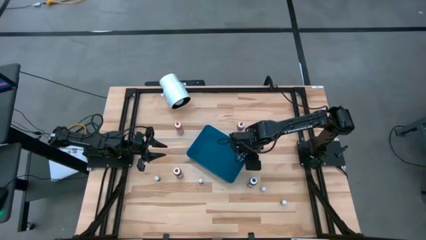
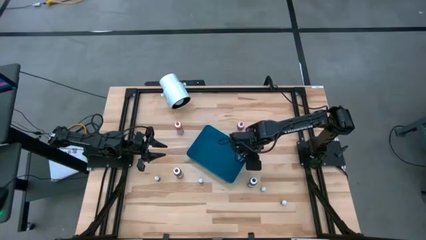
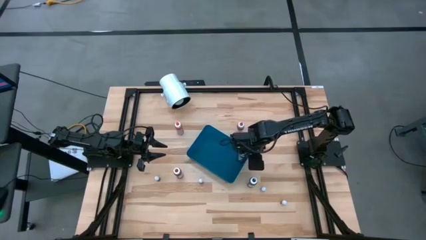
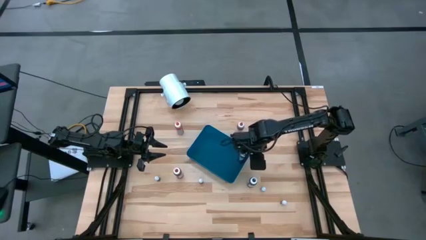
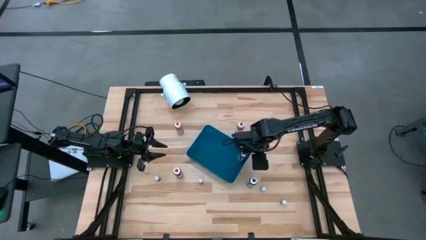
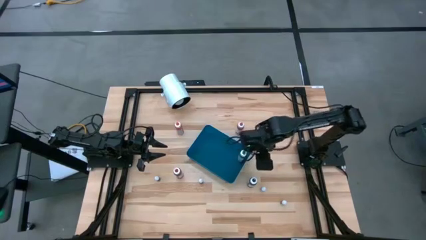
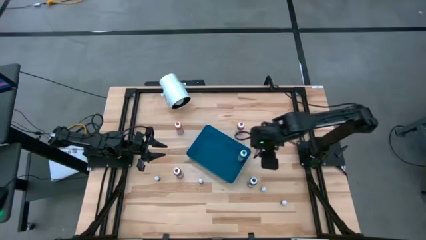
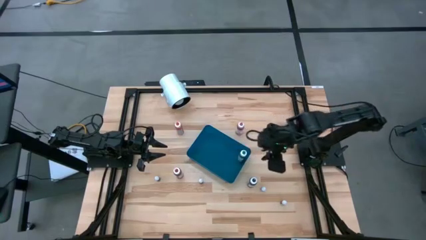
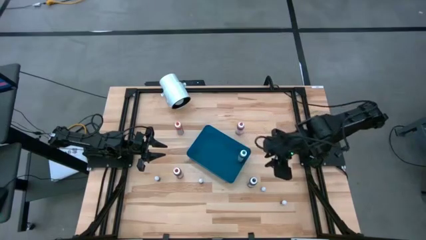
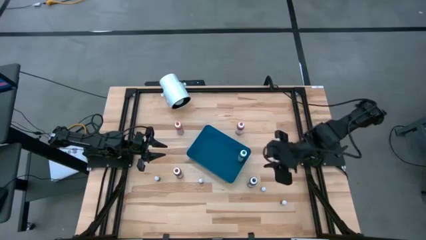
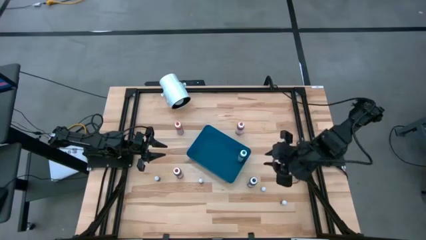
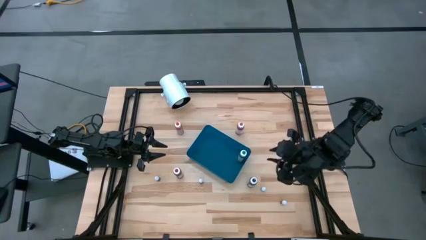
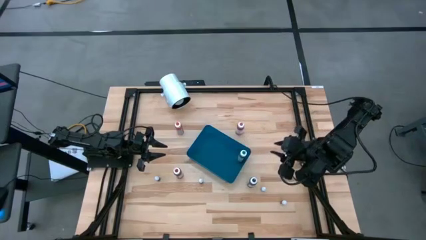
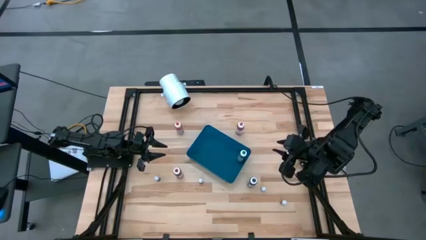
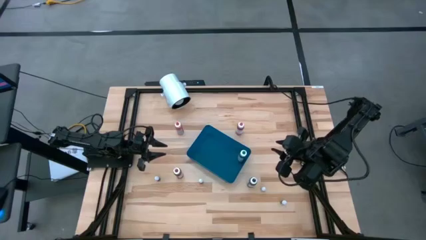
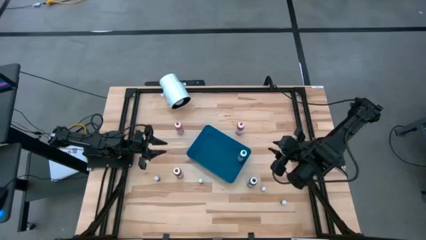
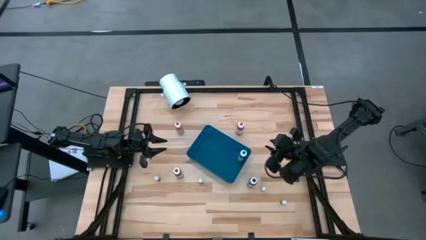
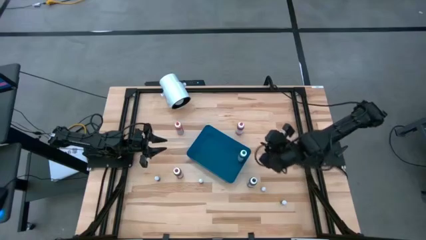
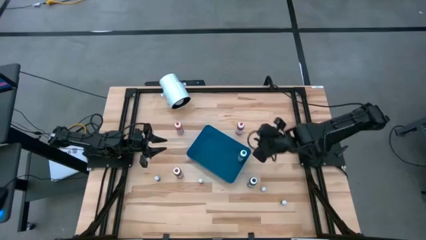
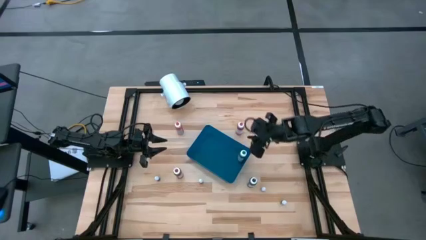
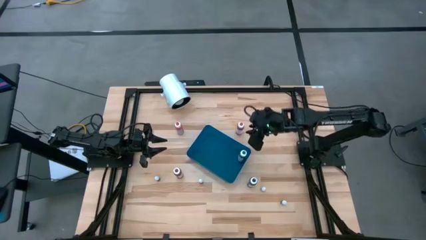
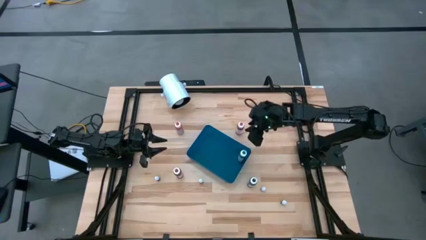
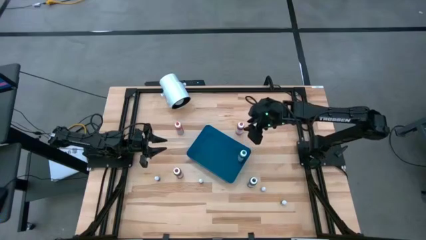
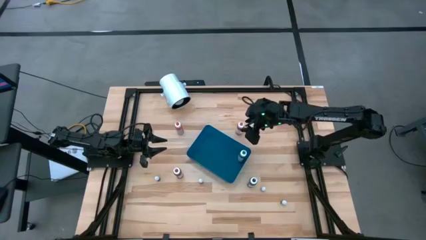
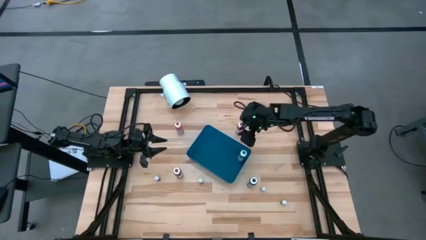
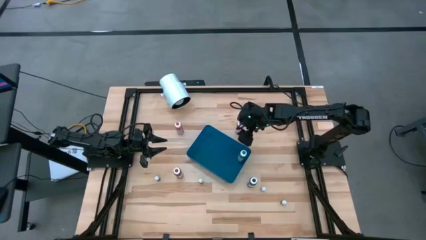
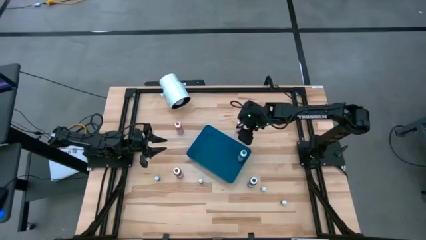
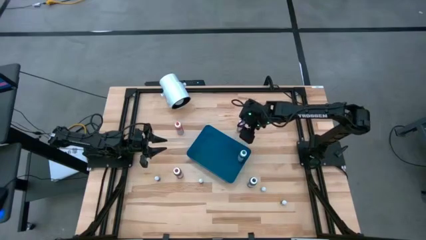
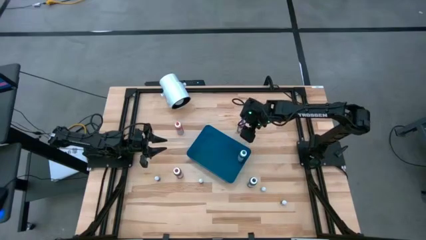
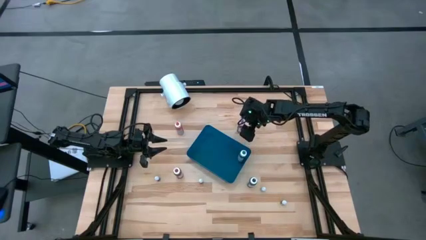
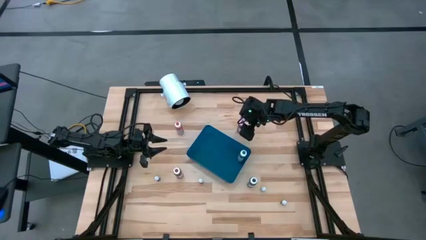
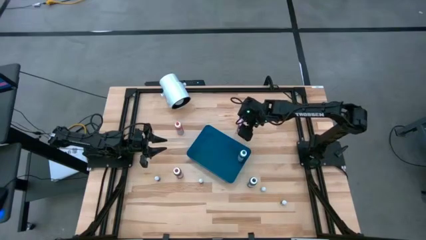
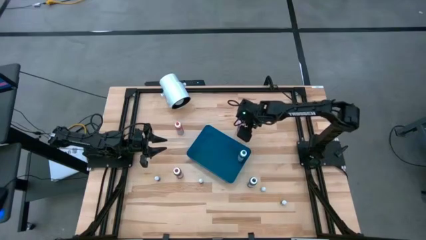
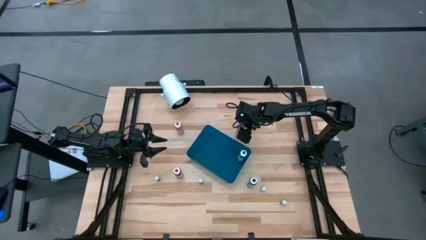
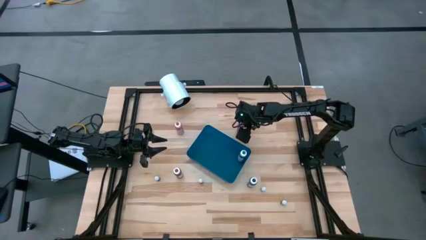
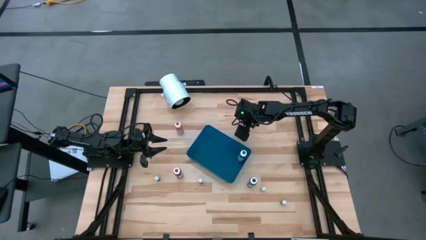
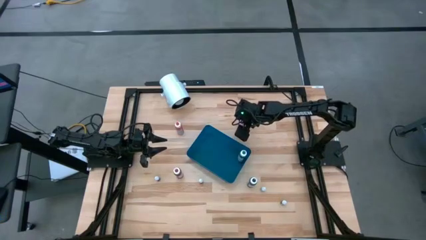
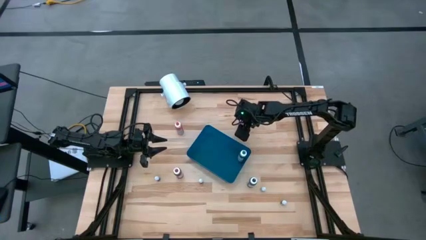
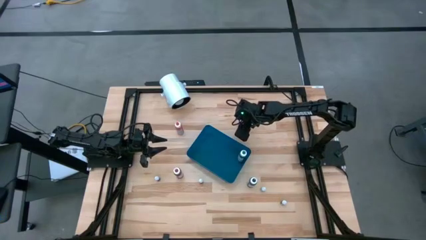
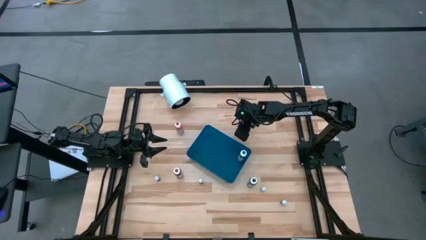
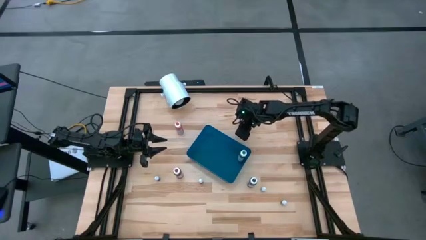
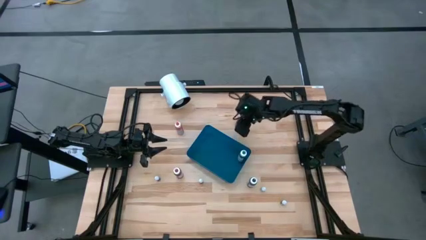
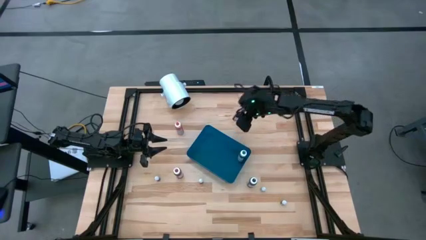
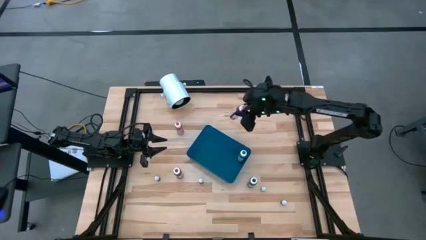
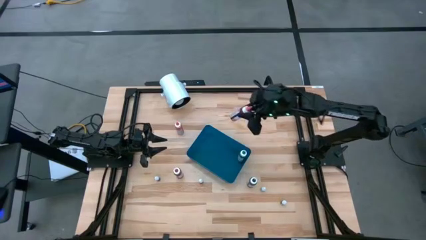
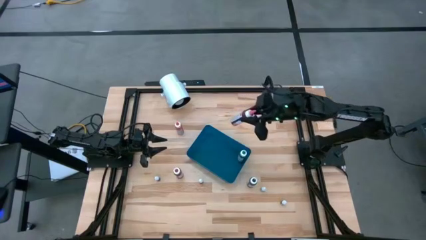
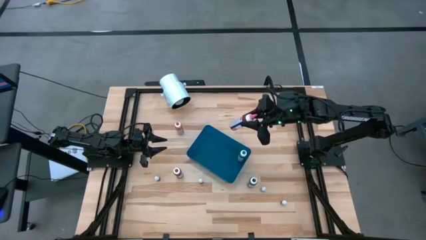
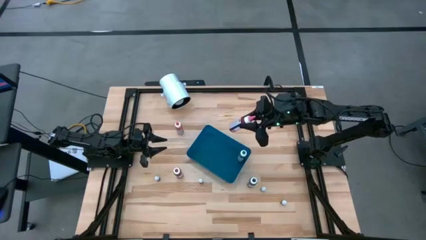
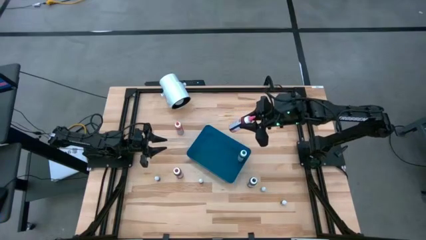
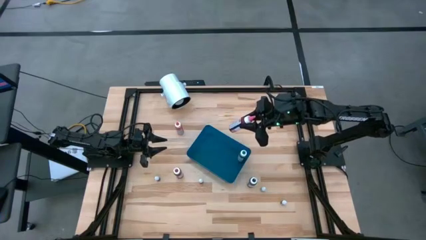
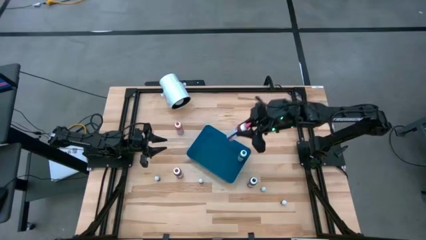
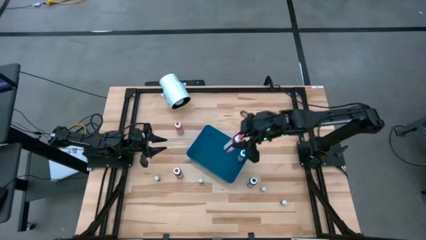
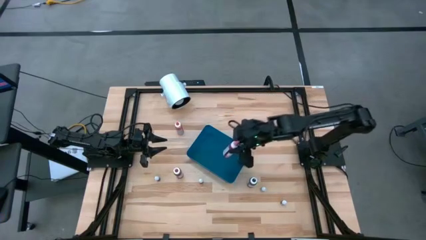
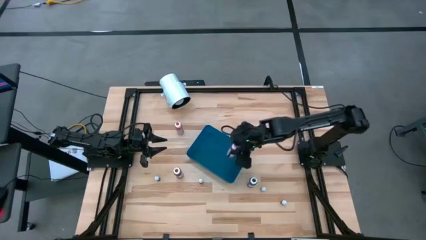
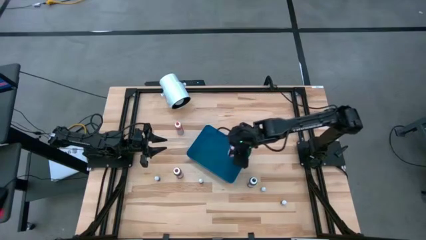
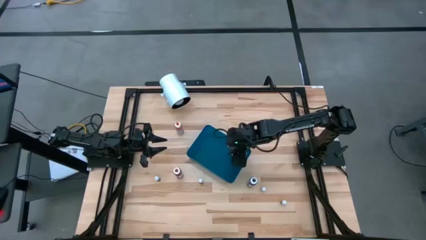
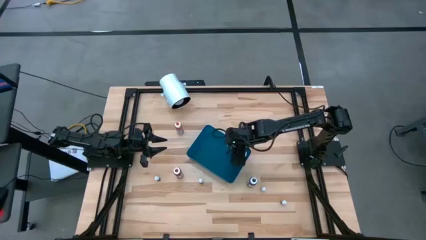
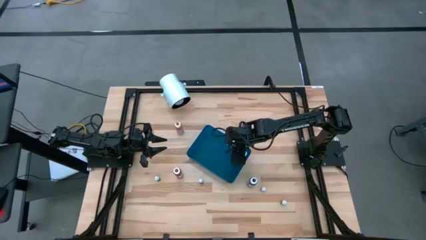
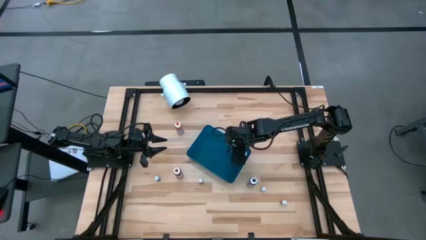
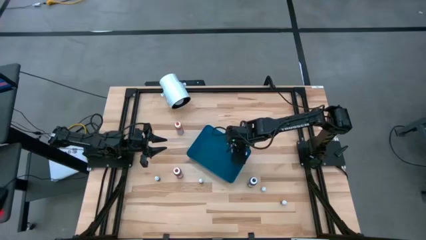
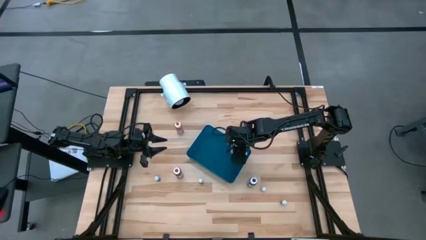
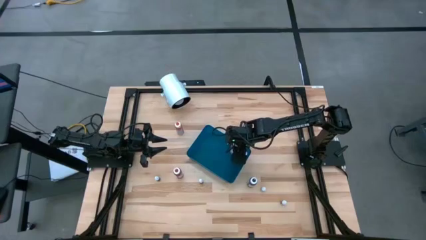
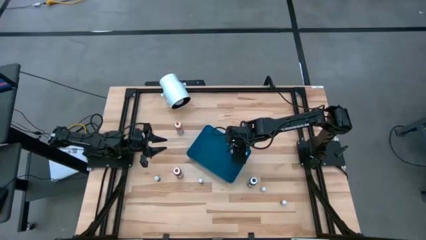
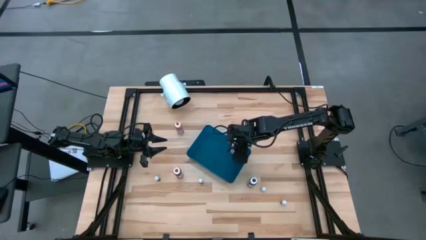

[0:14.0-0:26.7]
Task: Pick & Place food coloring
Put the big pink food coloring bottle into the blue bin
